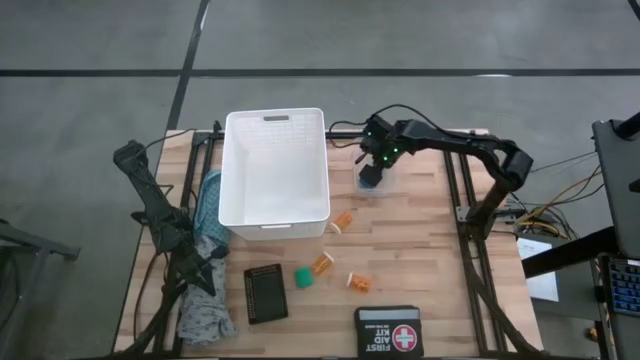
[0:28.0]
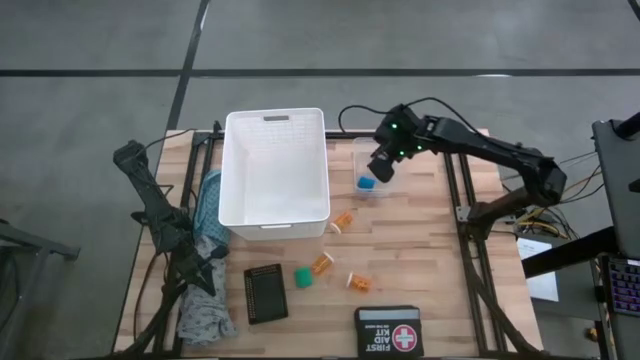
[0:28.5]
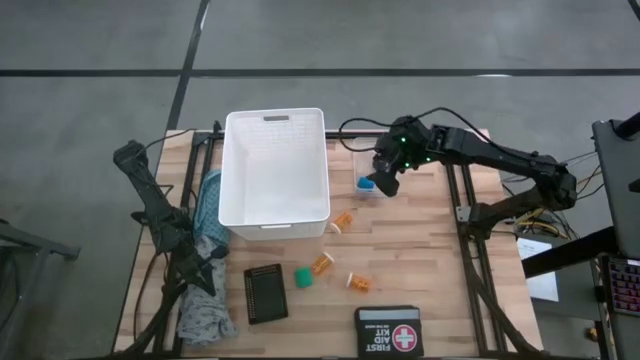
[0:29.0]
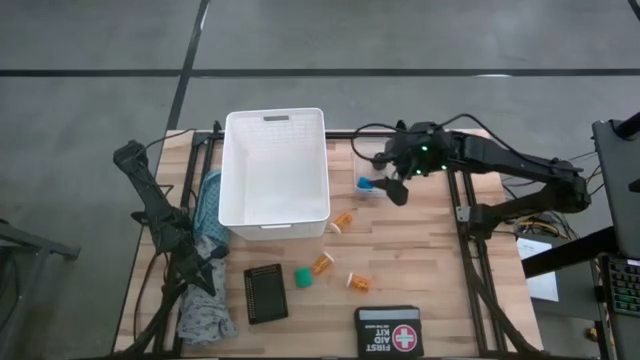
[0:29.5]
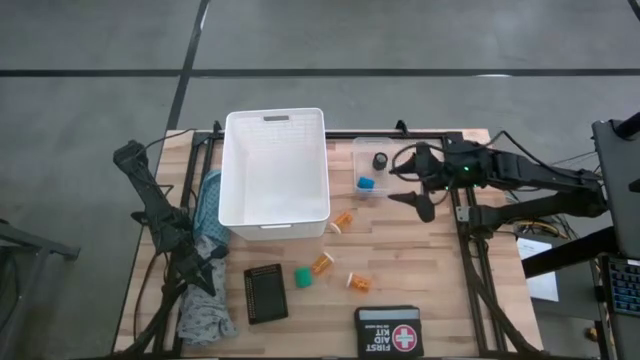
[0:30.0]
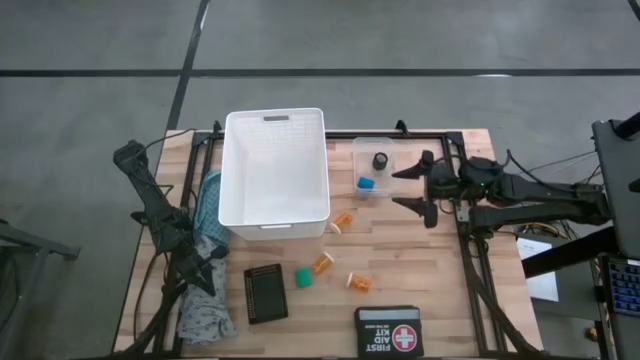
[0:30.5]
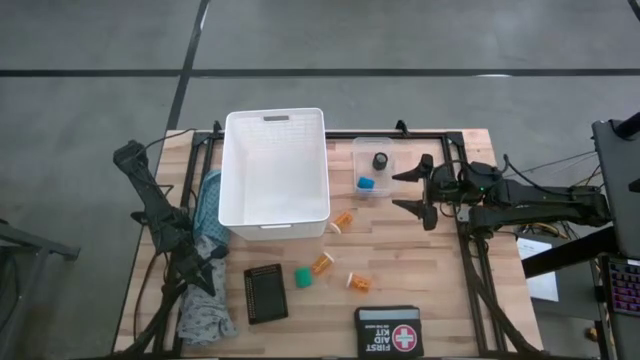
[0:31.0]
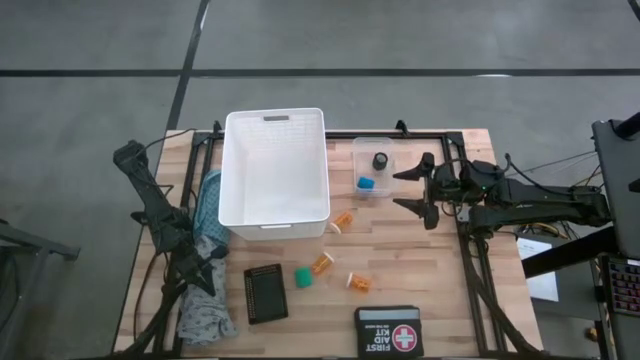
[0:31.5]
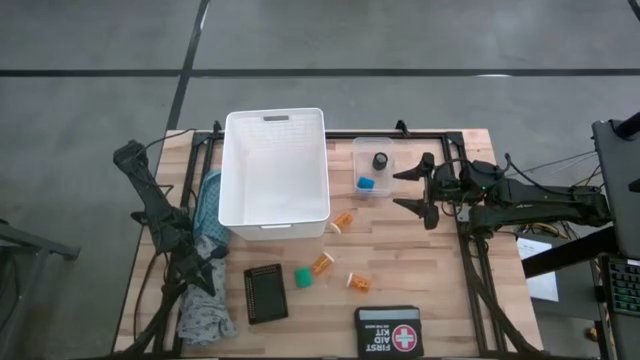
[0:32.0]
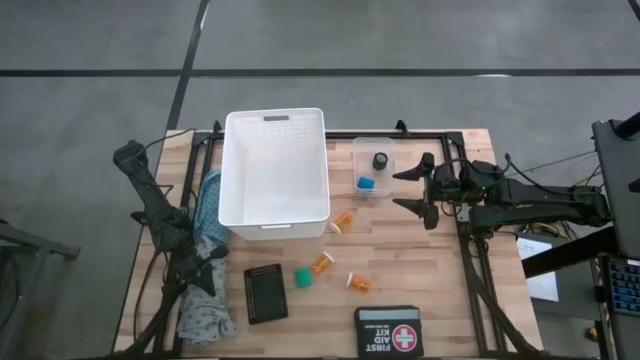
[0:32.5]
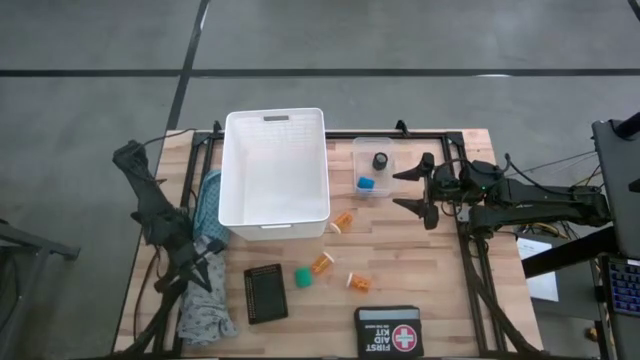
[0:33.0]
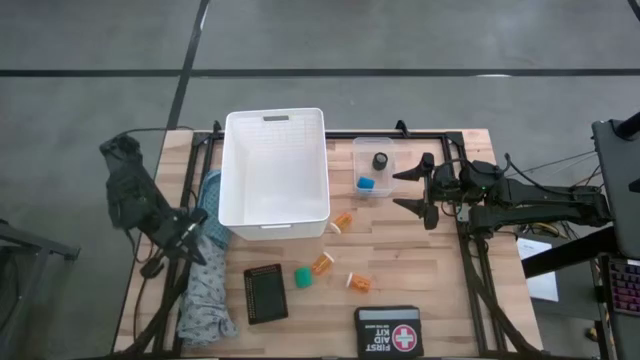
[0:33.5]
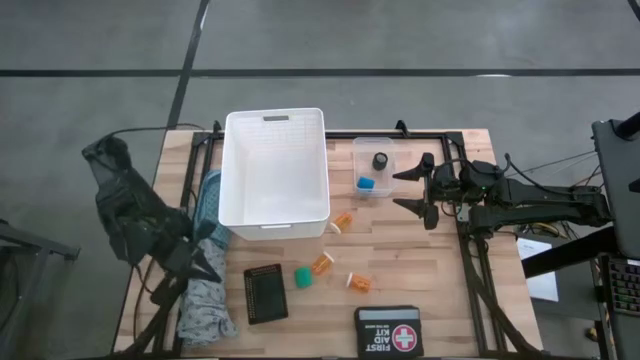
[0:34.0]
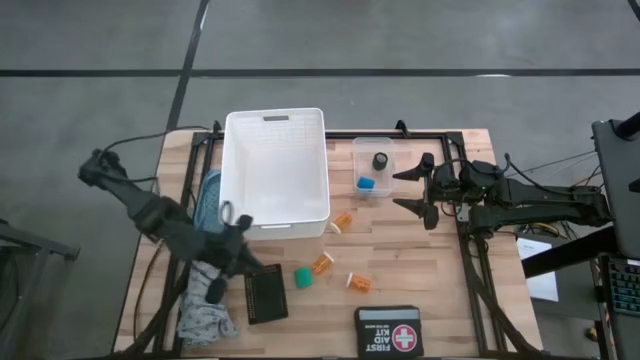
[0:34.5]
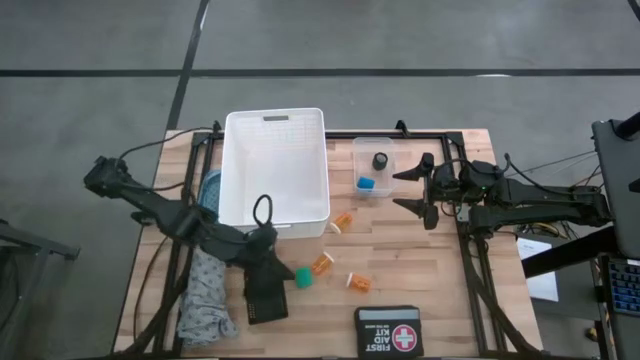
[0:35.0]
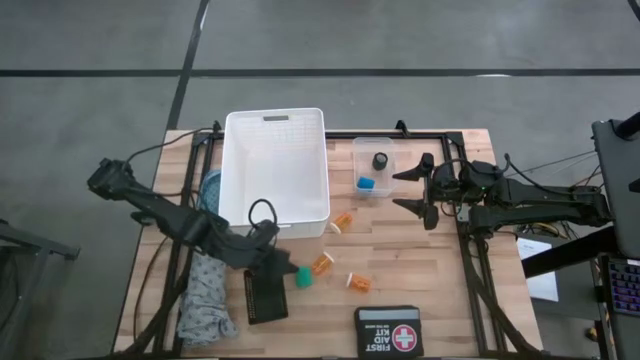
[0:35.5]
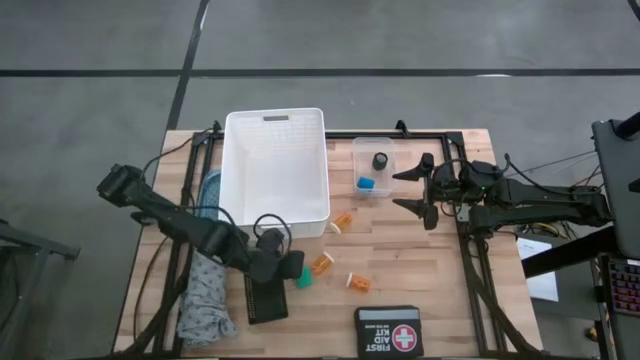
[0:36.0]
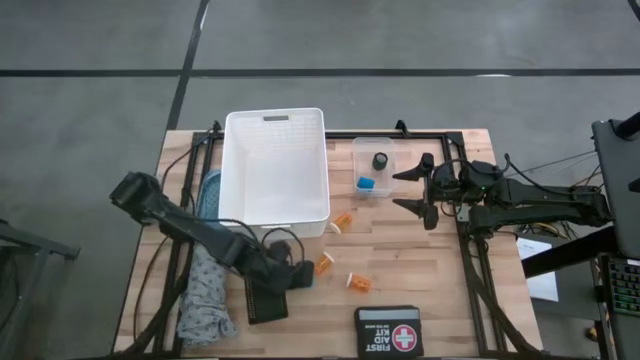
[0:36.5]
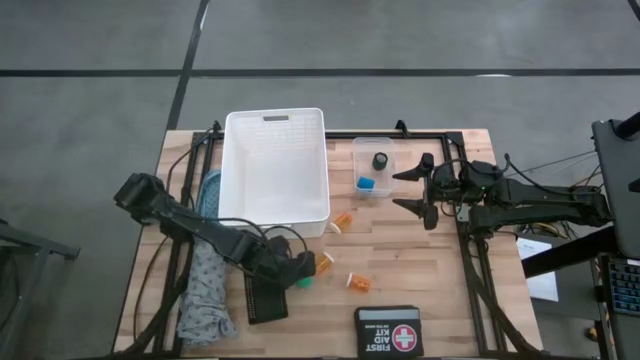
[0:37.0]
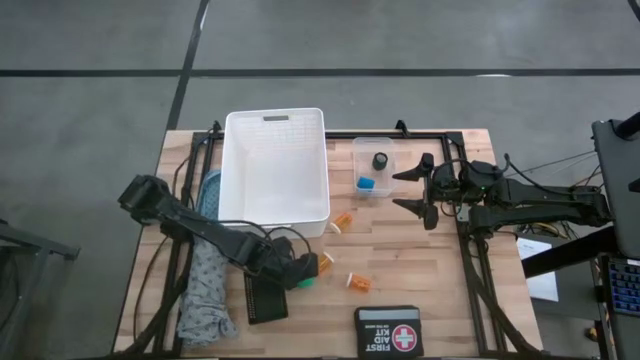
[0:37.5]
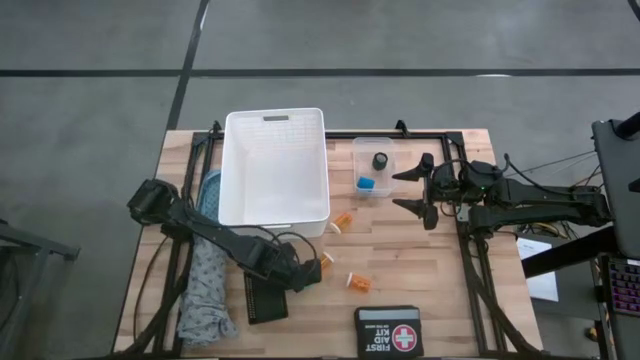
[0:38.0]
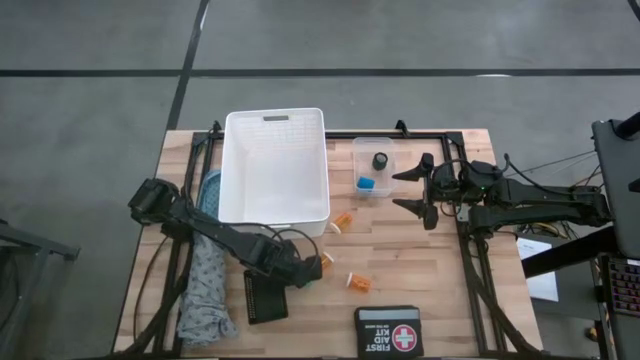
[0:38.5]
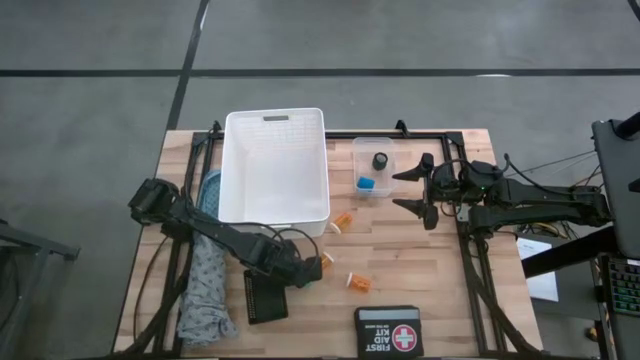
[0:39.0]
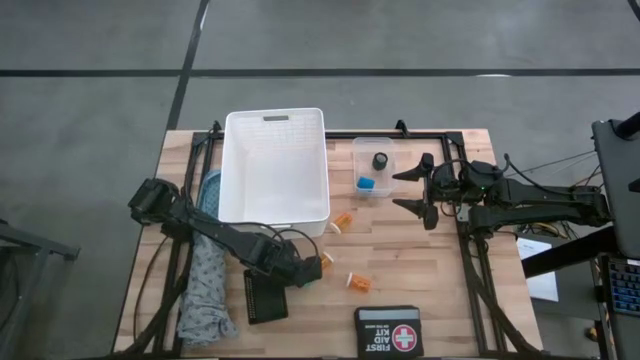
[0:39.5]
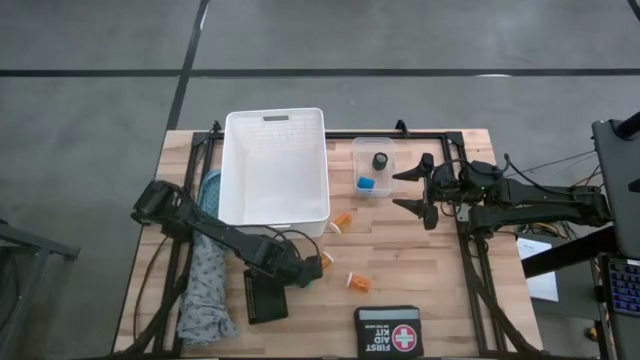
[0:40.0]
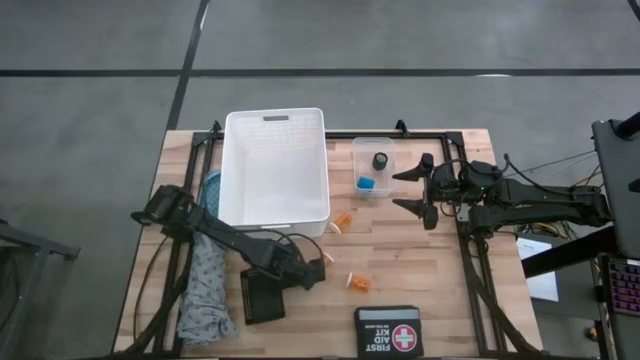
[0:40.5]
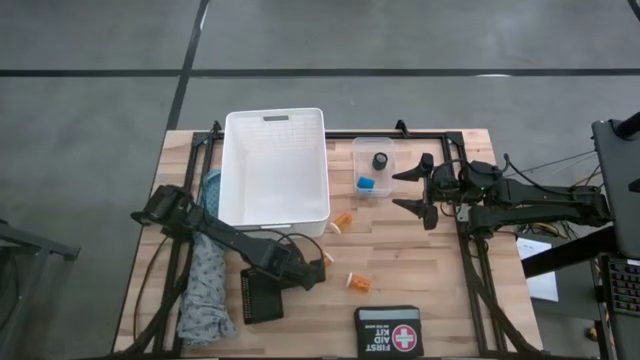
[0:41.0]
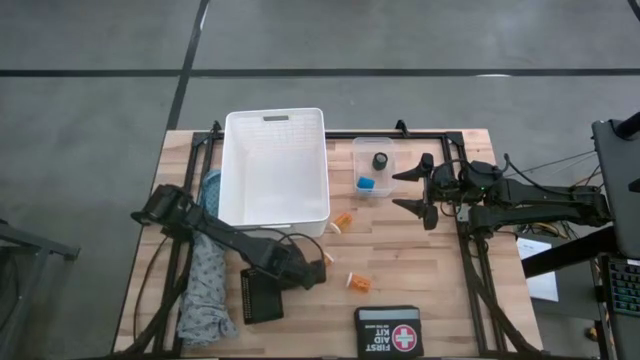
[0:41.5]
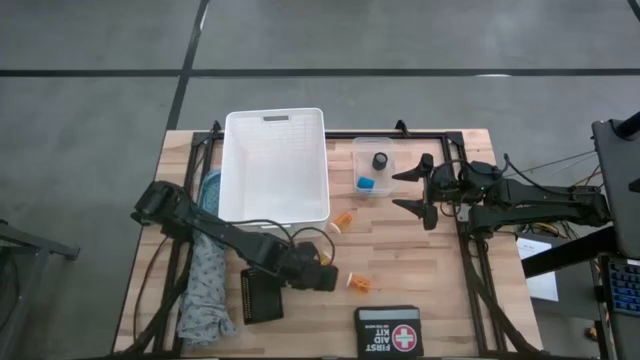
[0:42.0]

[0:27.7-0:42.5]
Task: Pick & place medical supplies in basket/bin
Put the green roll bandage into the transparent bin

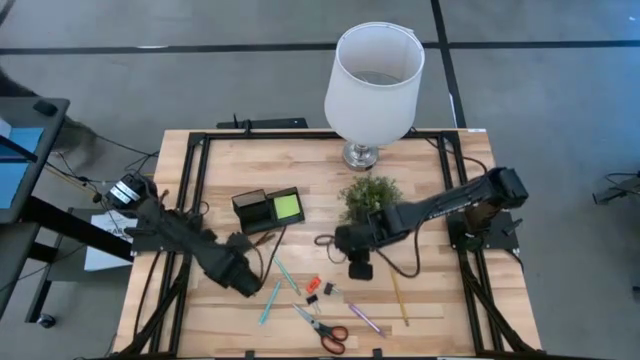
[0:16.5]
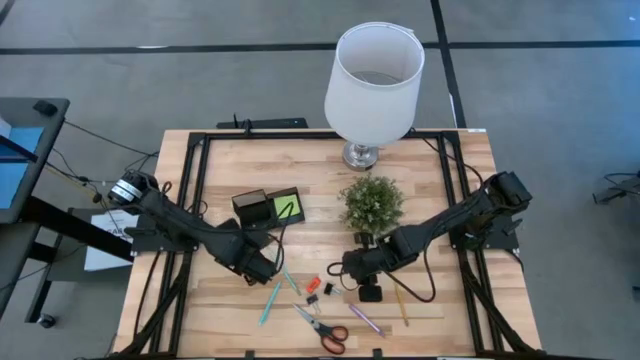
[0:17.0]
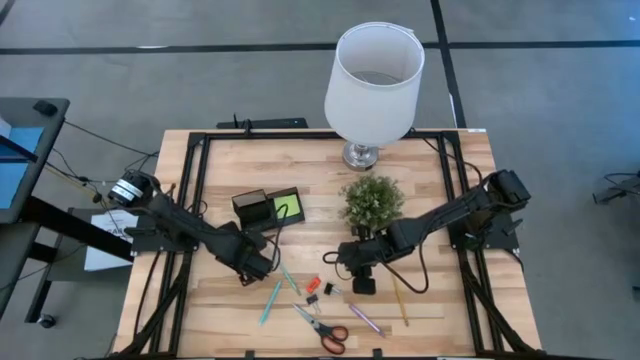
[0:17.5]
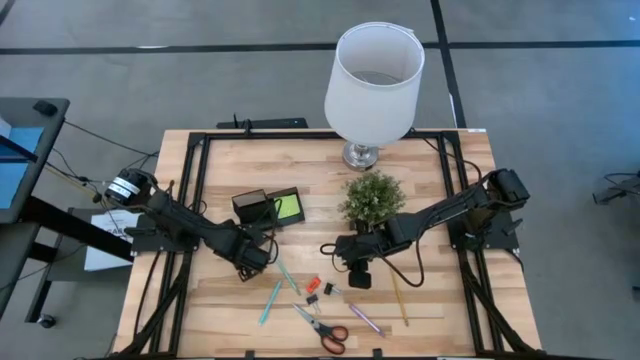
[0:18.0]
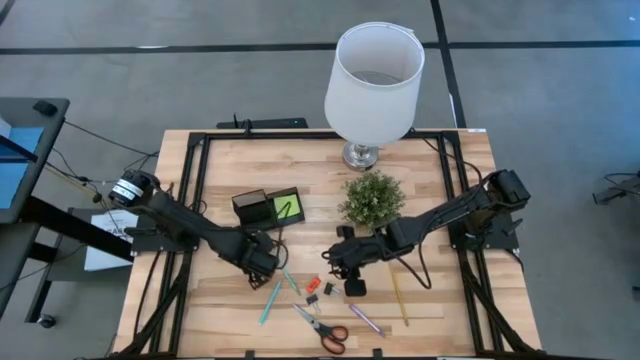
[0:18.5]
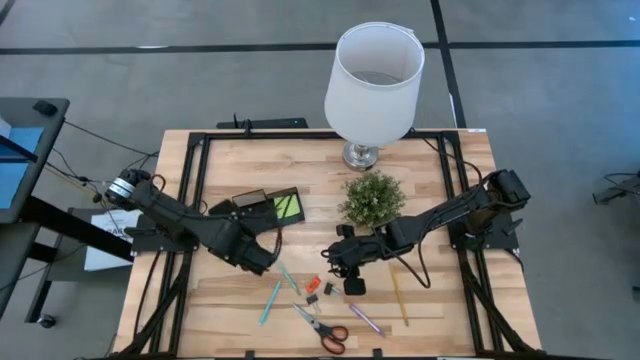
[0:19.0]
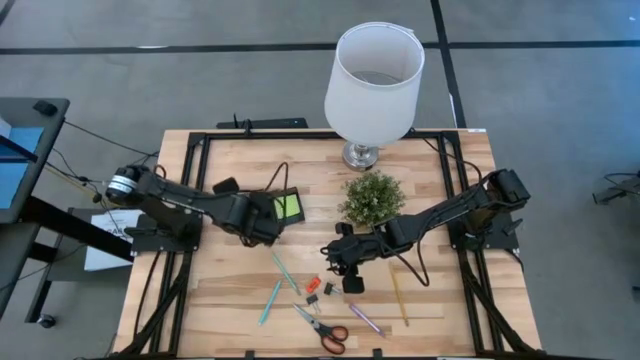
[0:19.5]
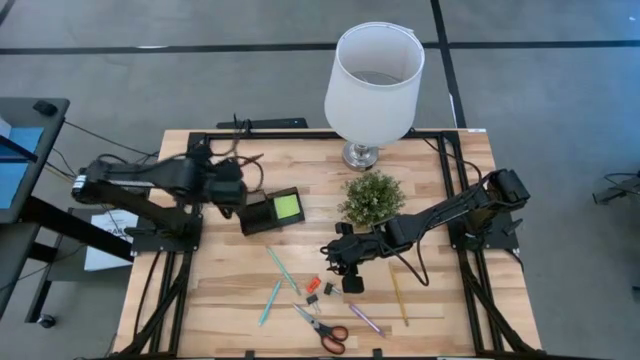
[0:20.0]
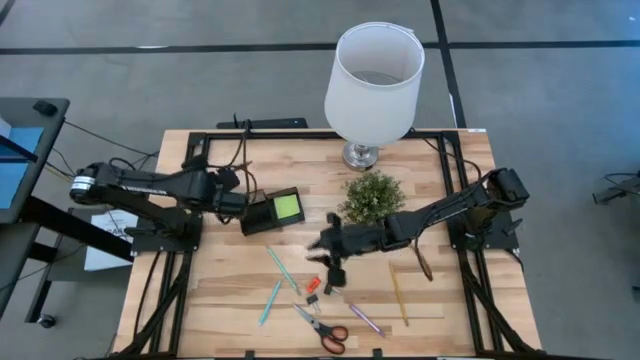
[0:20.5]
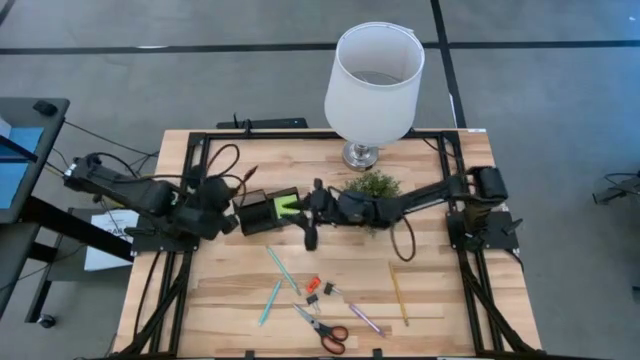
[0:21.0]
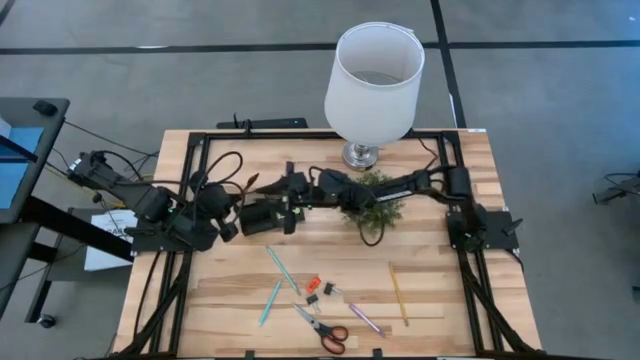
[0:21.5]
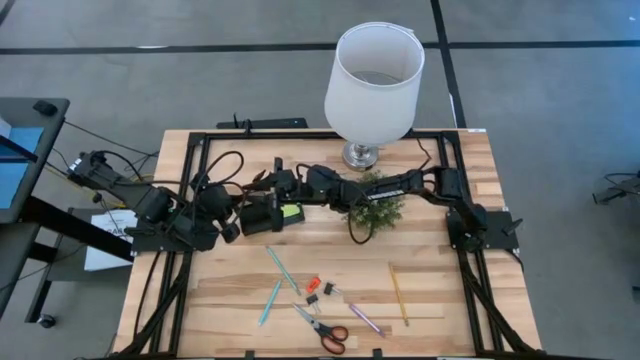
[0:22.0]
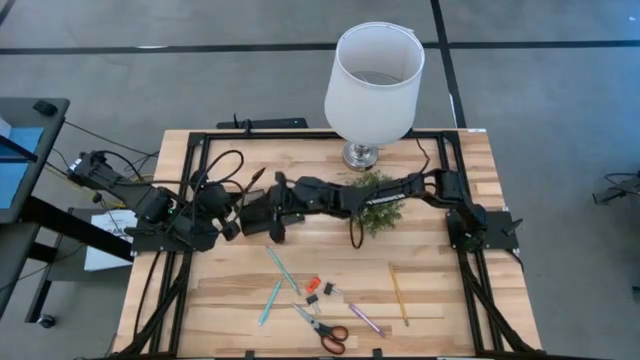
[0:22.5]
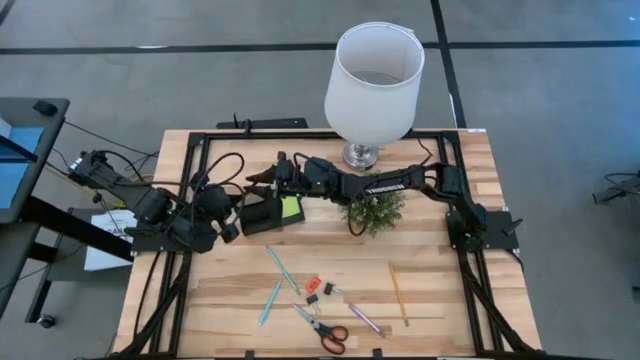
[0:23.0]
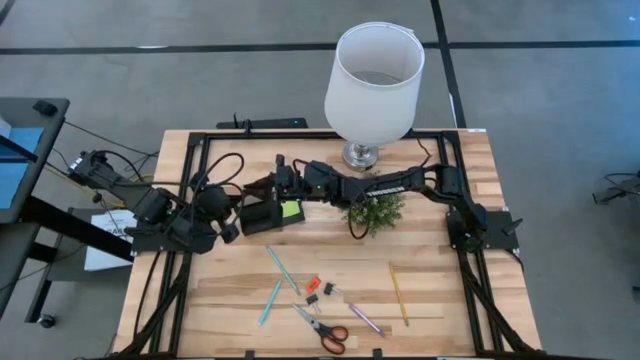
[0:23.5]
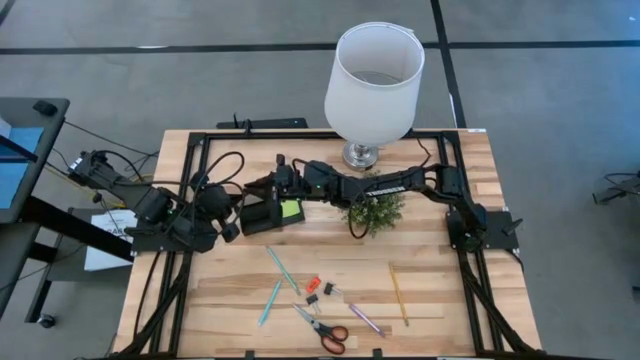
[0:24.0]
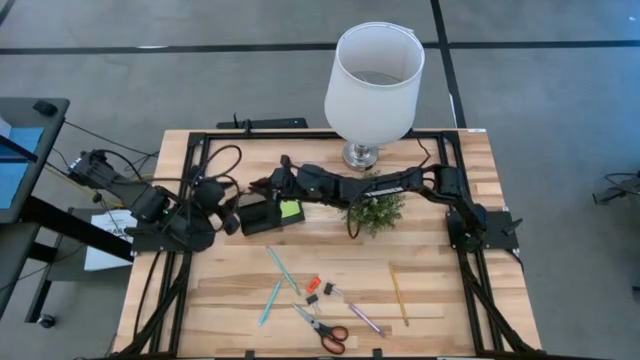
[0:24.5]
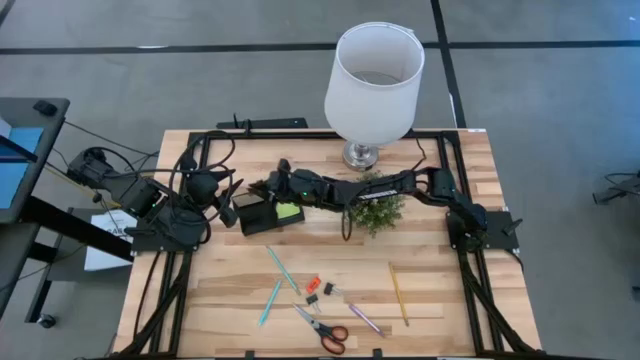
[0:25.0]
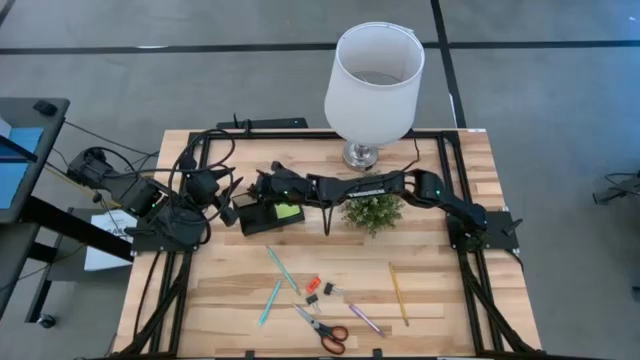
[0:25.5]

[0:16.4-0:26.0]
Task: Pick and place office supplies into organizer
Put the brown pen into the black desk organizer
